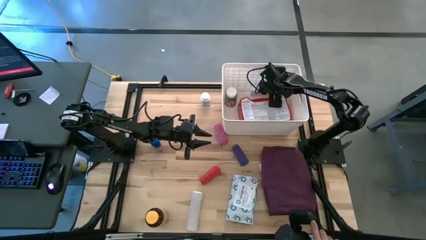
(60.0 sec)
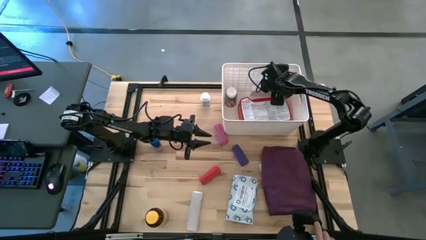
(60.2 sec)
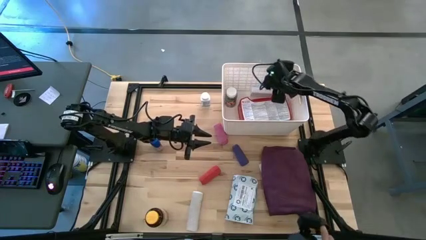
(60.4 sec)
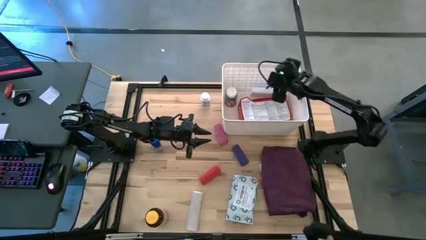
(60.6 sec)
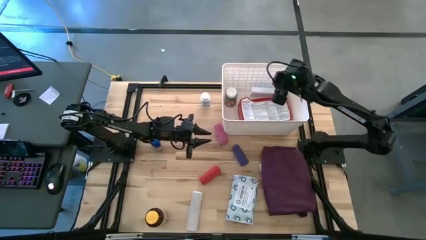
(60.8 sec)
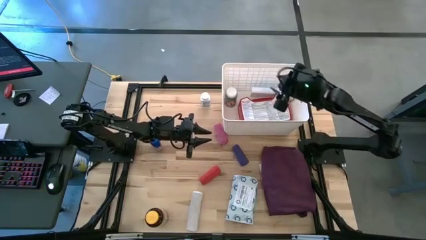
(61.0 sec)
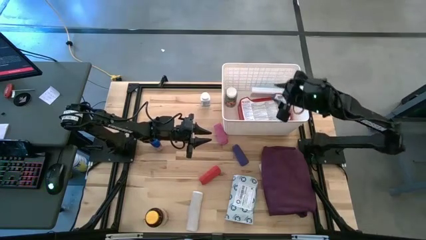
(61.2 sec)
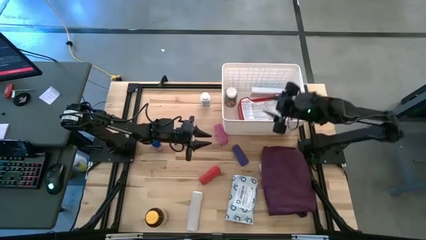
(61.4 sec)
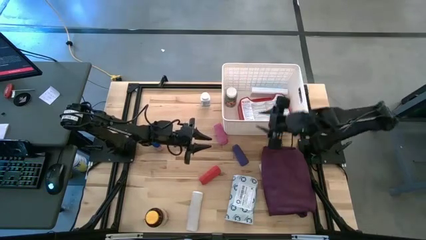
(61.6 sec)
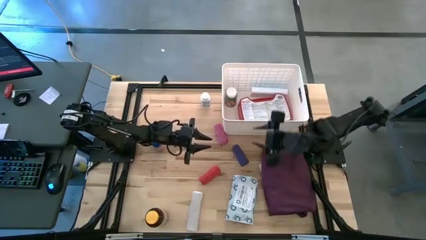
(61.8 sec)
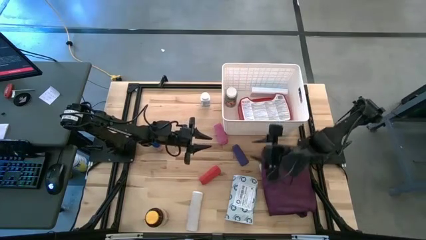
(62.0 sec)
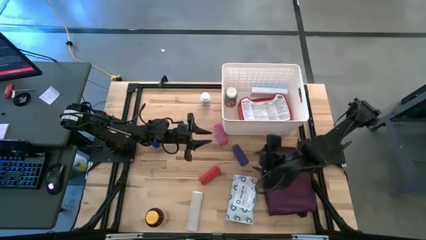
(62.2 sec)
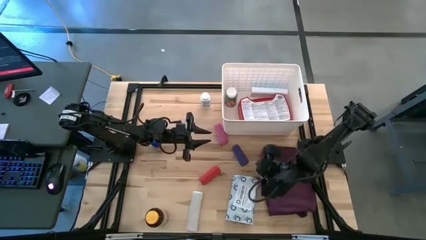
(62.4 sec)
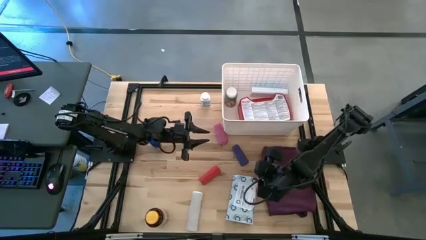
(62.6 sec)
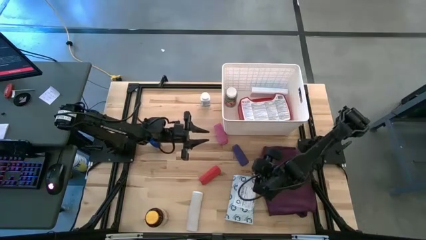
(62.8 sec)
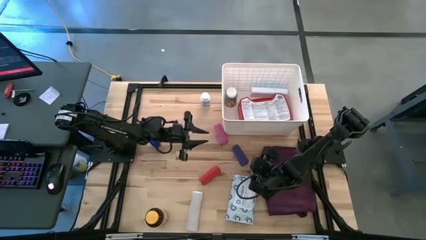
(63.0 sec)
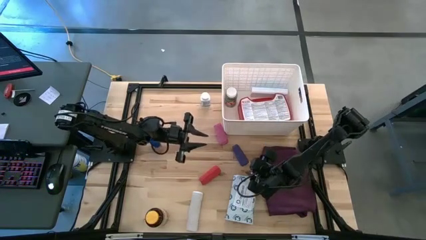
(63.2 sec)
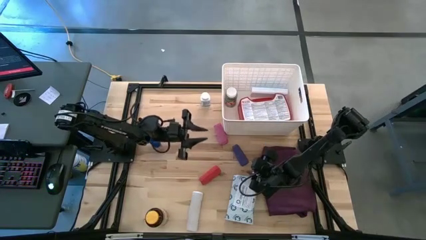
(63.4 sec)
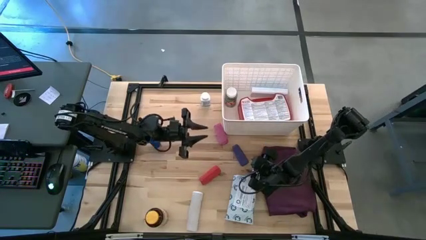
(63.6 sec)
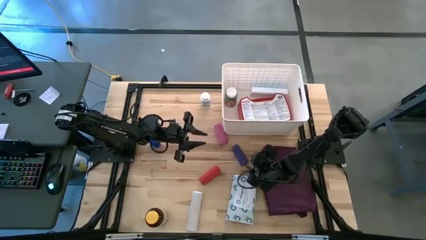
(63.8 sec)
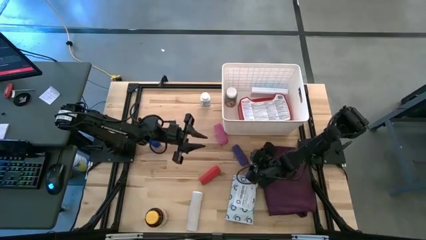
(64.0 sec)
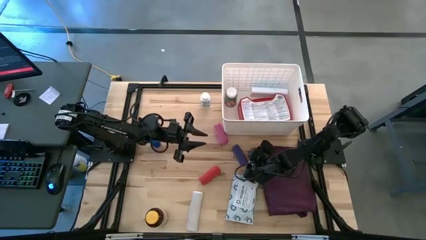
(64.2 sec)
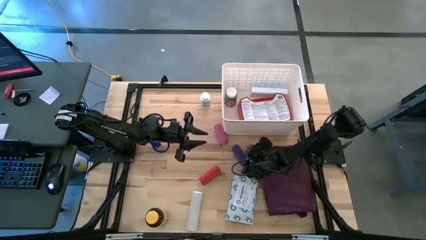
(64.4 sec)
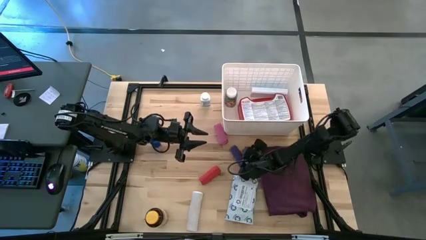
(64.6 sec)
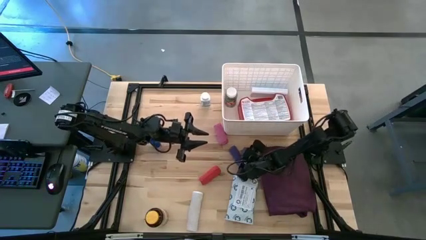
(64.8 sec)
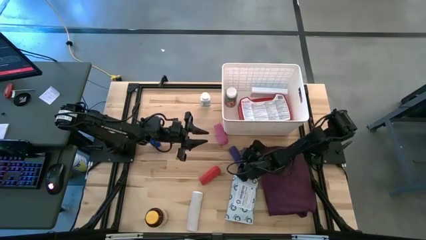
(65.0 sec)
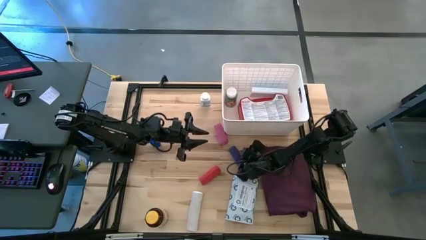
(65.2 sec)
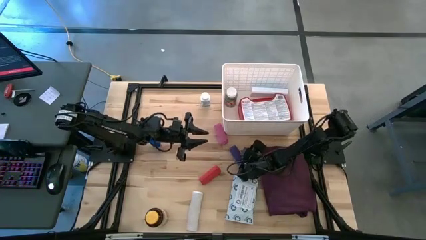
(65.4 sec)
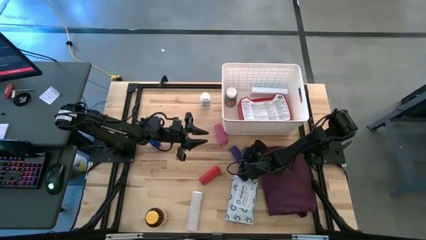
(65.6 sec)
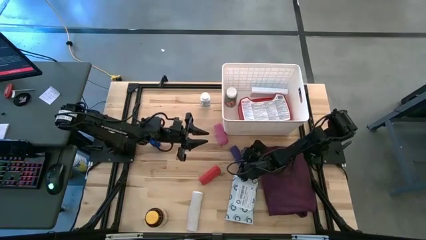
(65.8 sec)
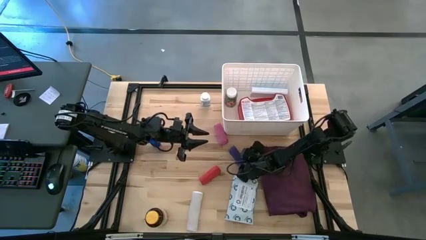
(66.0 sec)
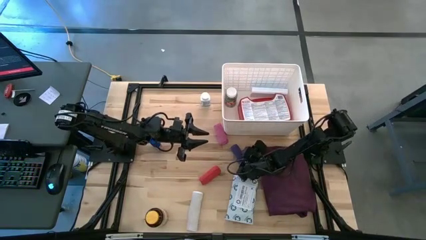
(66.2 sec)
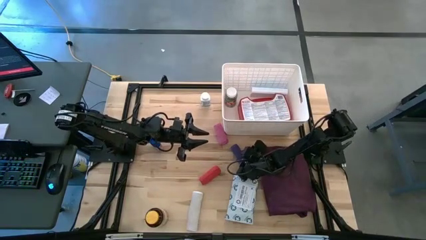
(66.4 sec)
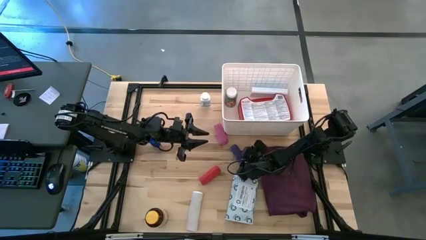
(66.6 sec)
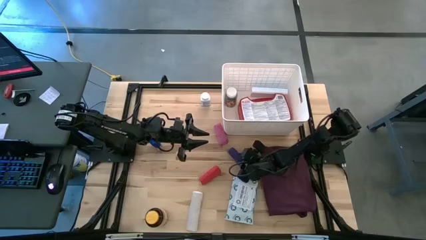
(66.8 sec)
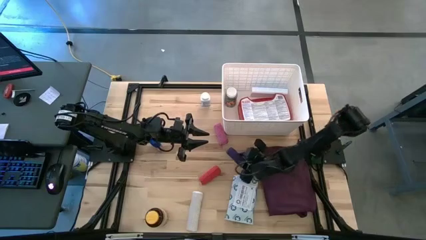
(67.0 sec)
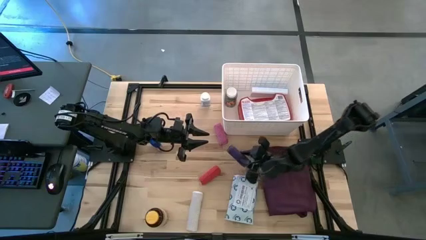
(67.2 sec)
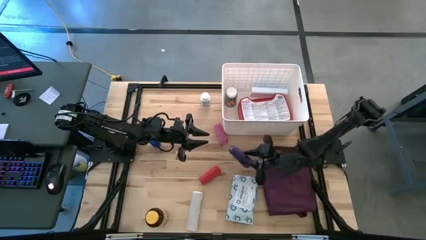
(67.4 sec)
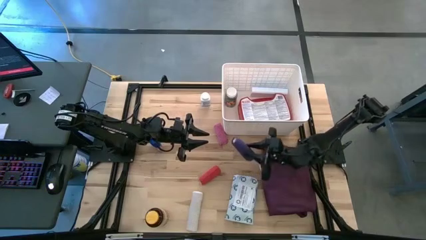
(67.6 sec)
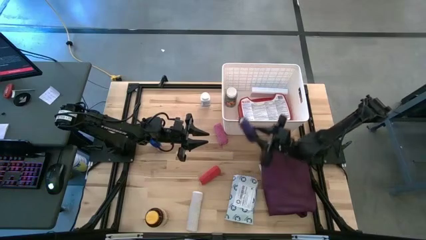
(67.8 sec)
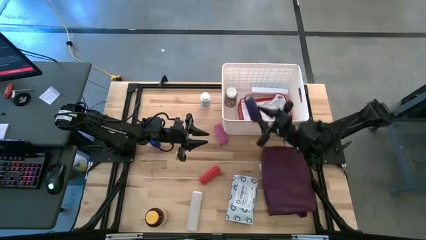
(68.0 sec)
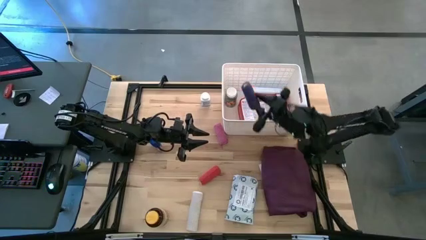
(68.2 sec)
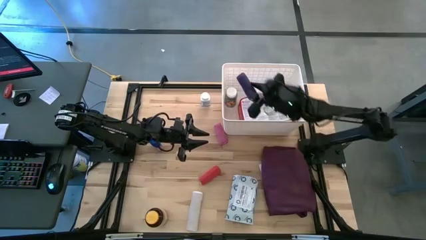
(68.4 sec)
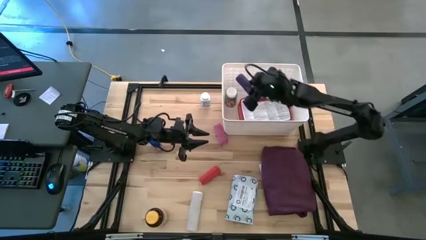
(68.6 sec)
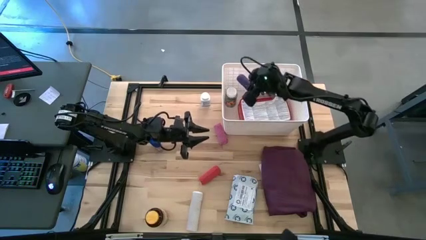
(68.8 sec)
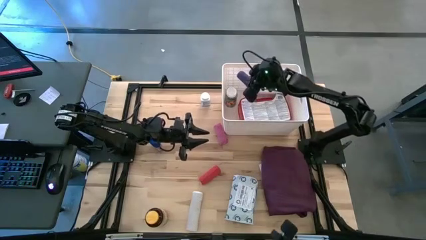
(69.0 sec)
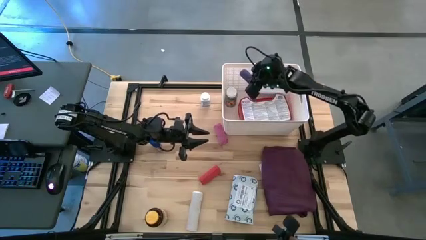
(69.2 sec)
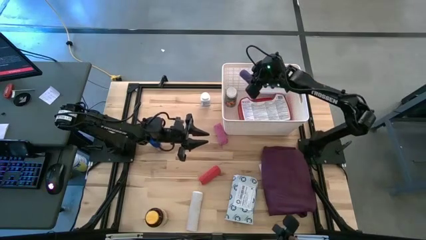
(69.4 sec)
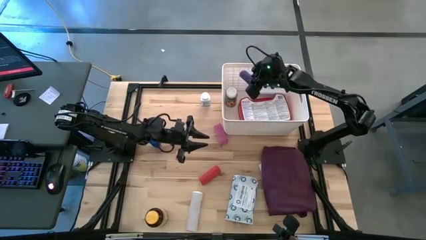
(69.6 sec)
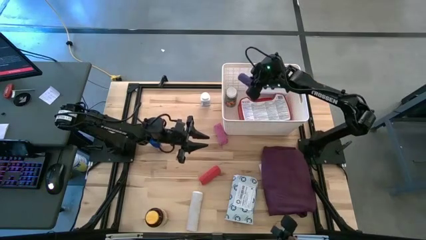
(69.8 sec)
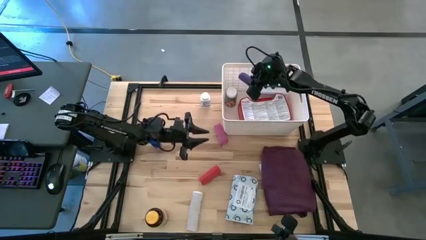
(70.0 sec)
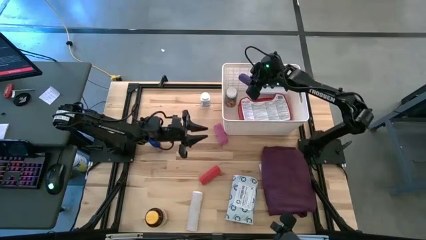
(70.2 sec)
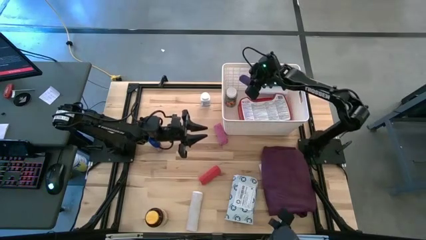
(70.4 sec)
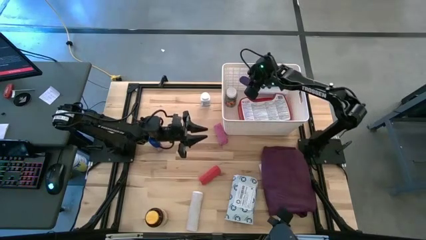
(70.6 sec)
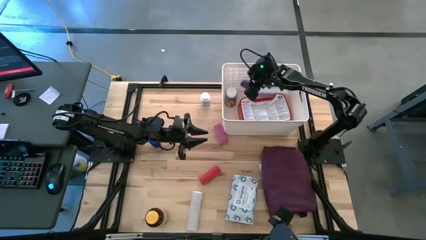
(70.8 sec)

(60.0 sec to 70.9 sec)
Task: Pick & place medical supplies in basket/bin
Put the purple bandage into the white container

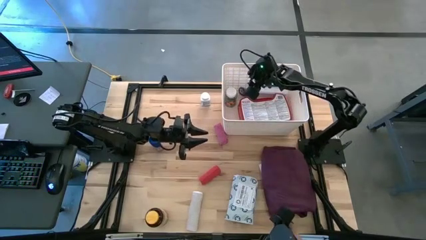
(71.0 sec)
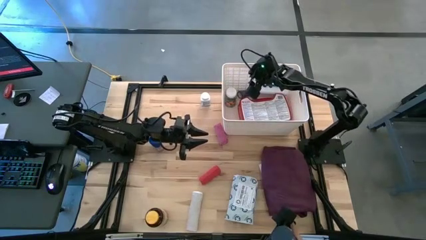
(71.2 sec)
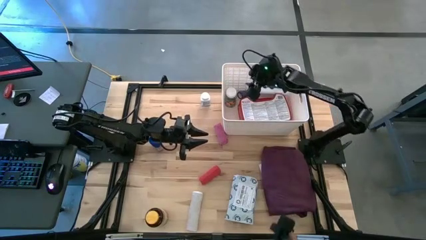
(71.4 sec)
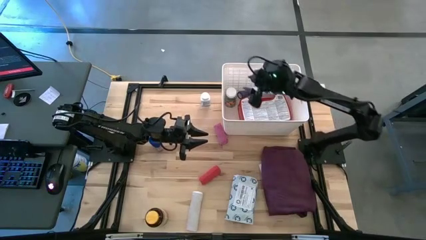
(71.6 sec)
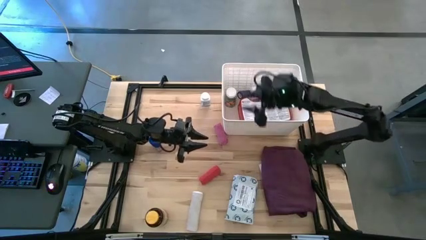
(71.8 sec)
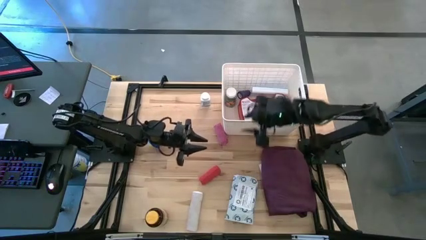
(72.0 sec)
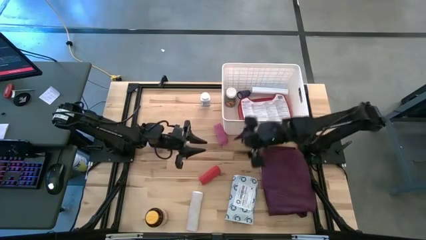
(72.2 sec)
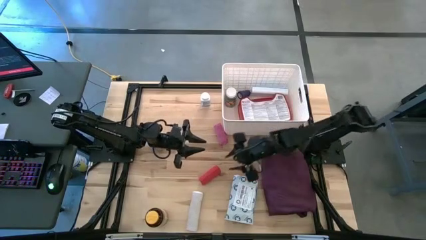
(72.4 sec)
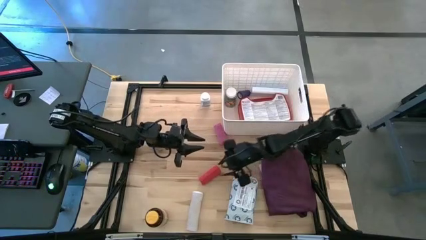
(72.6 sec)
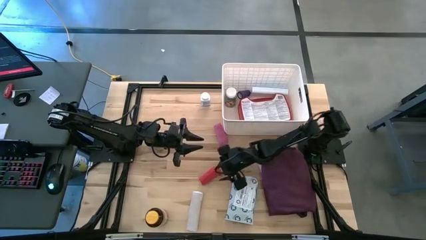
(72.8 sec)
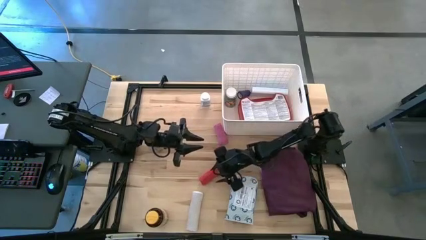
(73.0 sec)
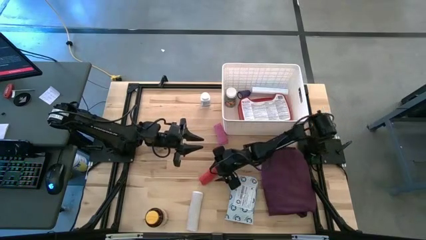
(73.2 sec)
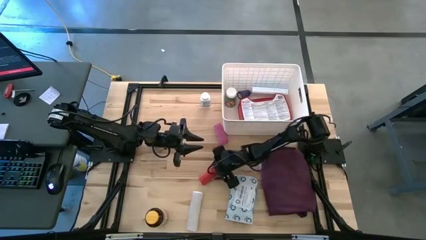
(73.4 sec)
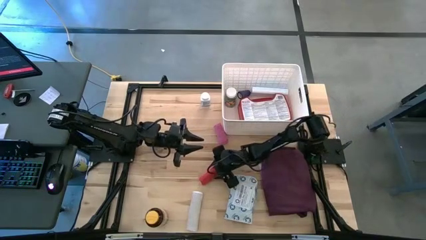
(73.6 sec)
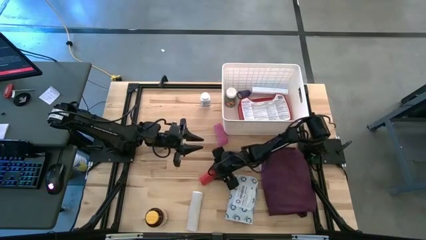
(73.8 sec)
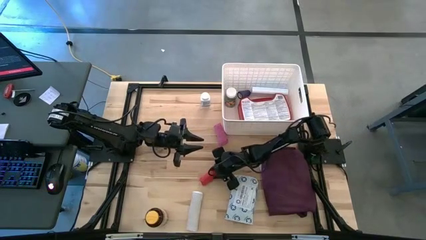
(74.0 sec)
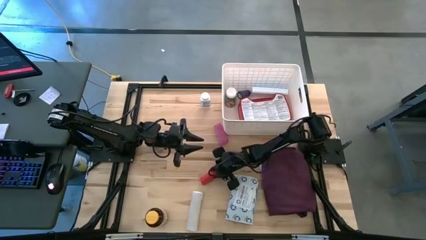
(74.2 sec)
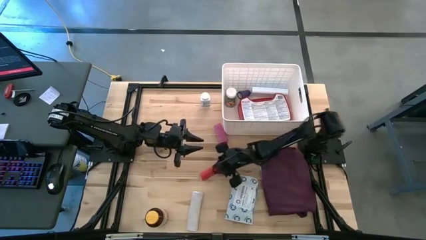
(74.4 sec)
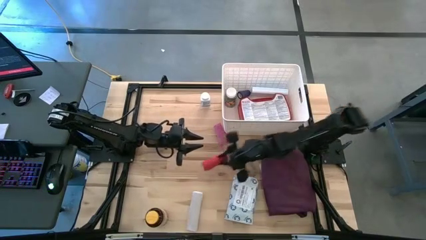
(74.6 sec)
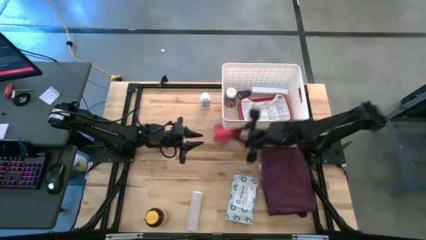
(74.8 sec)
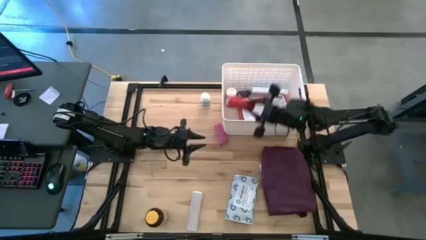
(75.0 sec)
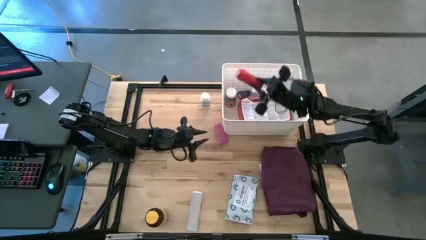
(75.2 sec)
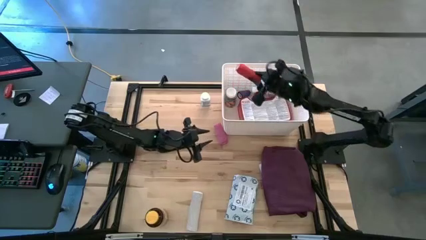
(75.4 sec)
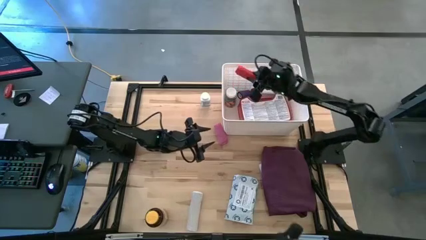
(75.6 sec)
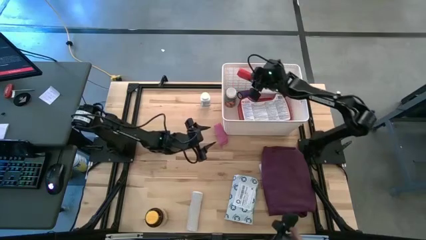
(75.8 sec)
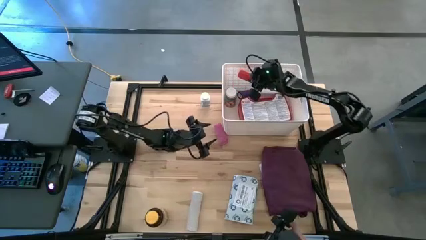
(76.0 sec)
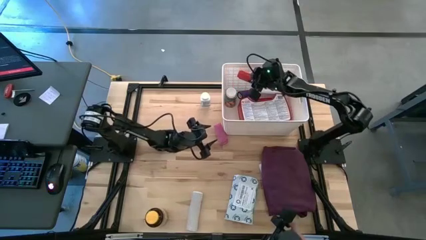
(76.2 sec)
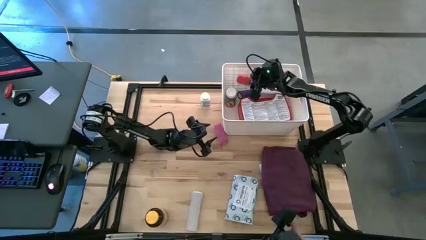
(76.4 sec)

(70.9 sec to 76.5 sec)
Put the red bandage into the white container
